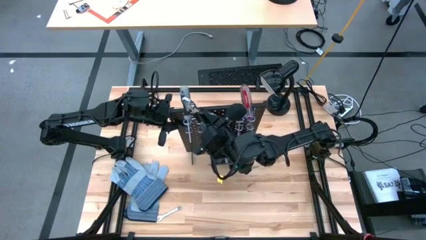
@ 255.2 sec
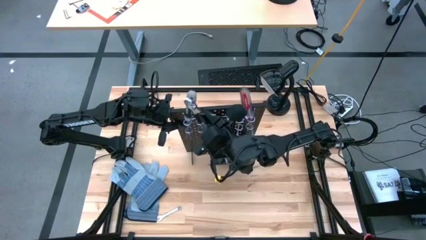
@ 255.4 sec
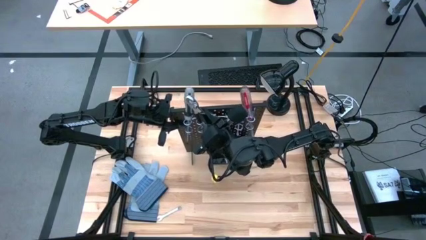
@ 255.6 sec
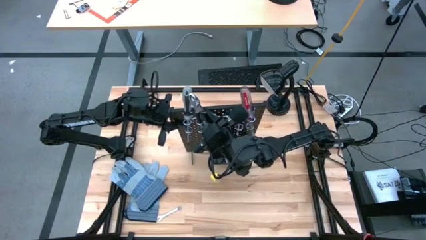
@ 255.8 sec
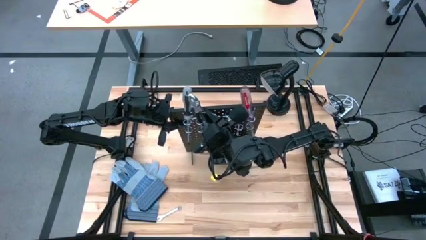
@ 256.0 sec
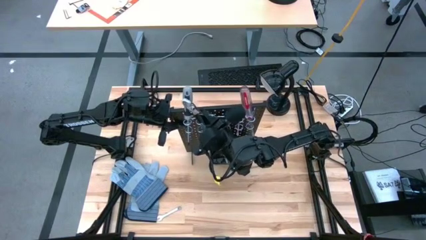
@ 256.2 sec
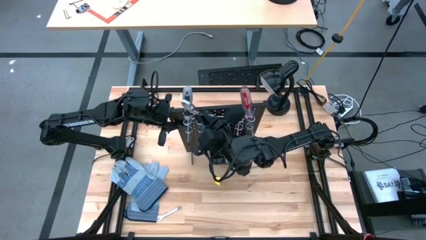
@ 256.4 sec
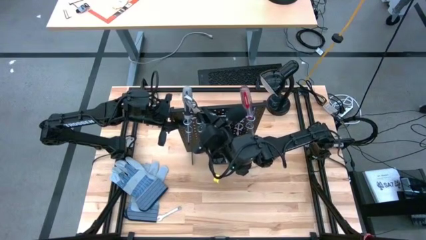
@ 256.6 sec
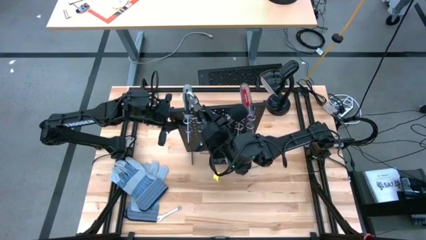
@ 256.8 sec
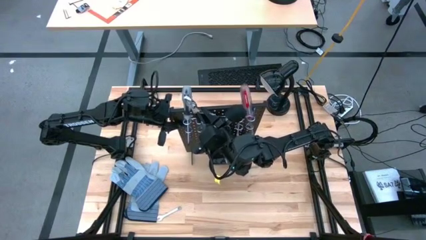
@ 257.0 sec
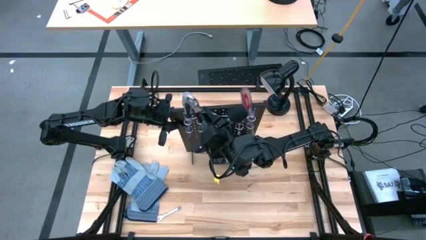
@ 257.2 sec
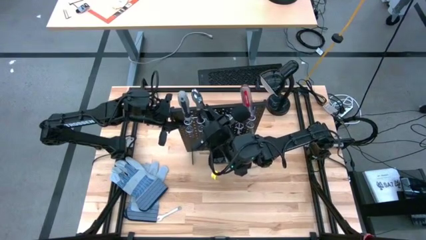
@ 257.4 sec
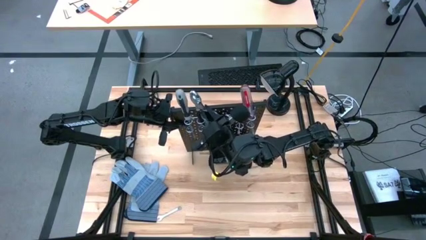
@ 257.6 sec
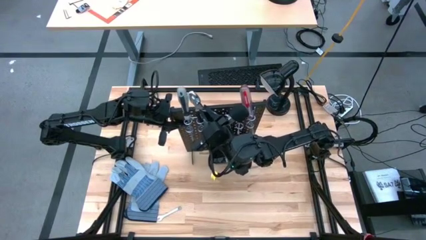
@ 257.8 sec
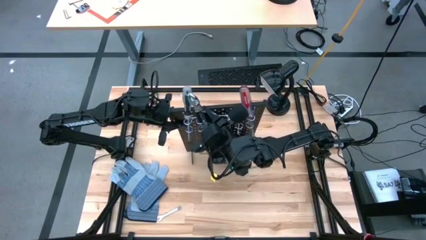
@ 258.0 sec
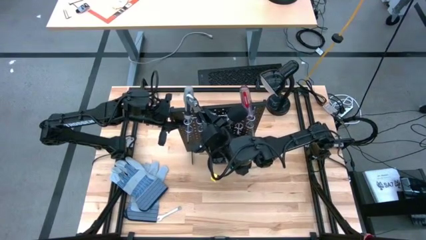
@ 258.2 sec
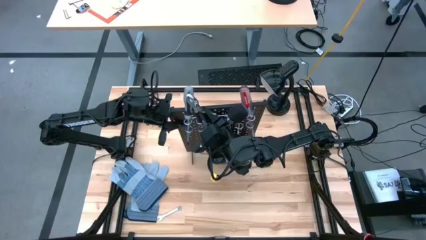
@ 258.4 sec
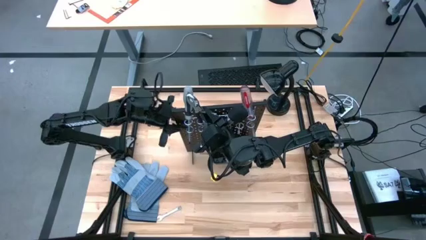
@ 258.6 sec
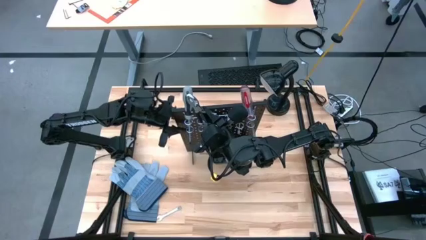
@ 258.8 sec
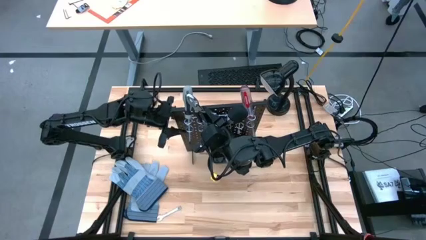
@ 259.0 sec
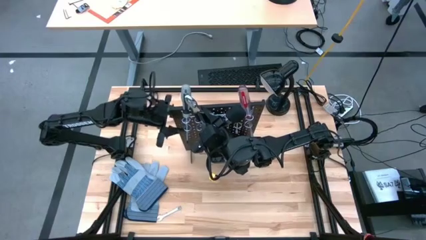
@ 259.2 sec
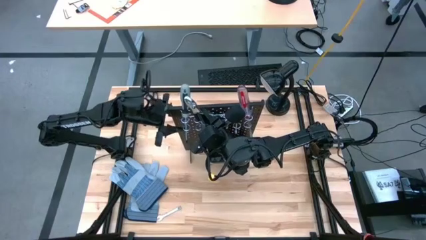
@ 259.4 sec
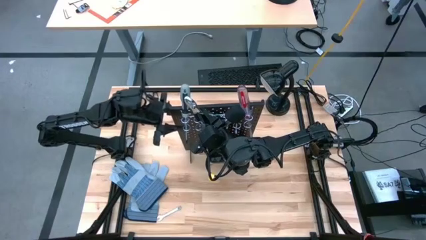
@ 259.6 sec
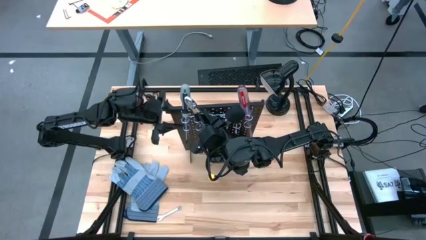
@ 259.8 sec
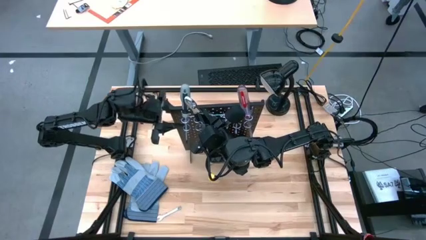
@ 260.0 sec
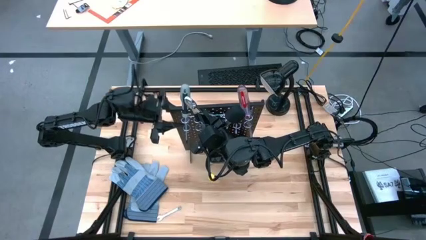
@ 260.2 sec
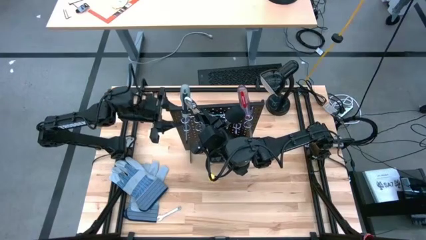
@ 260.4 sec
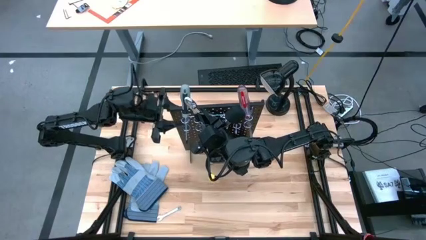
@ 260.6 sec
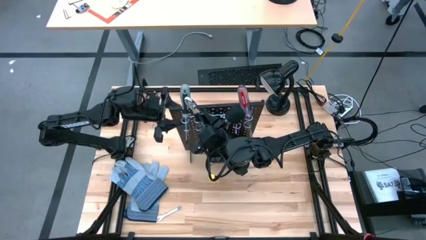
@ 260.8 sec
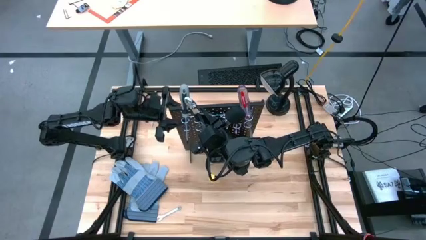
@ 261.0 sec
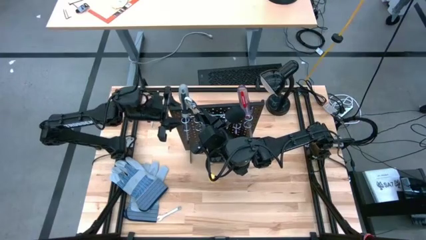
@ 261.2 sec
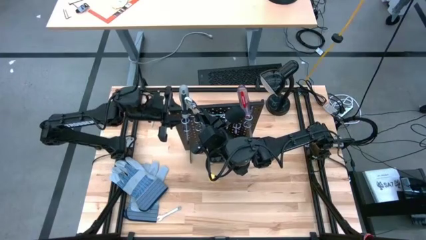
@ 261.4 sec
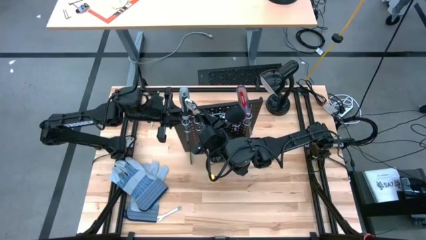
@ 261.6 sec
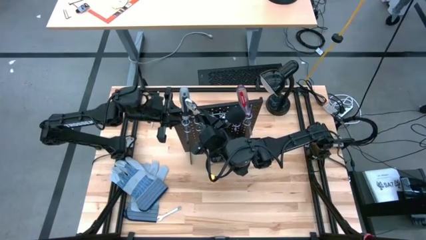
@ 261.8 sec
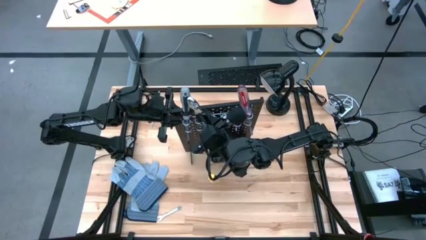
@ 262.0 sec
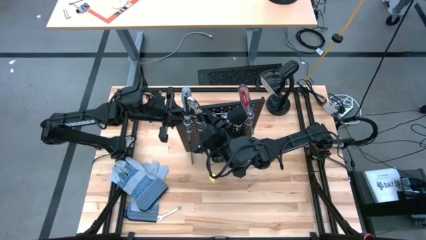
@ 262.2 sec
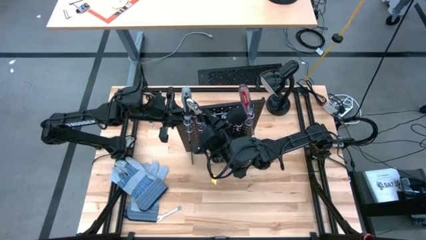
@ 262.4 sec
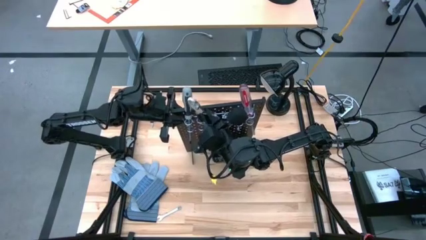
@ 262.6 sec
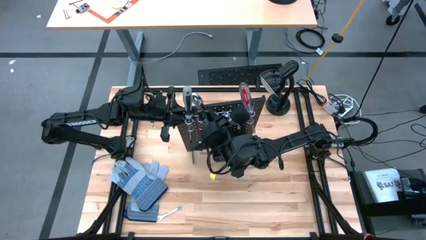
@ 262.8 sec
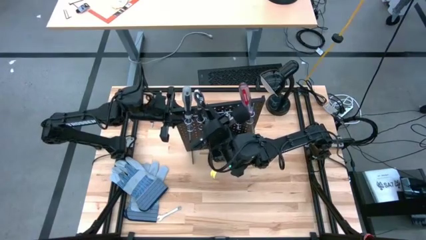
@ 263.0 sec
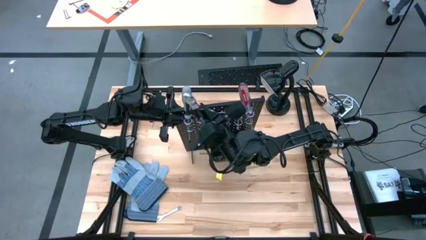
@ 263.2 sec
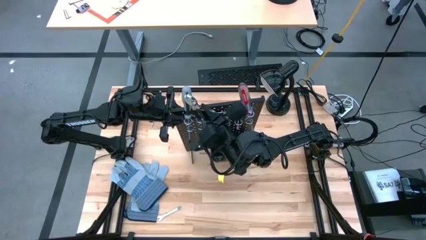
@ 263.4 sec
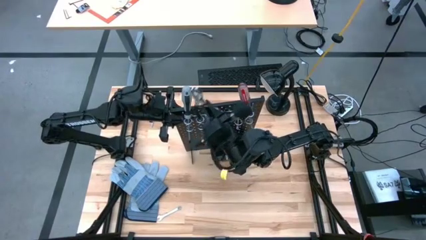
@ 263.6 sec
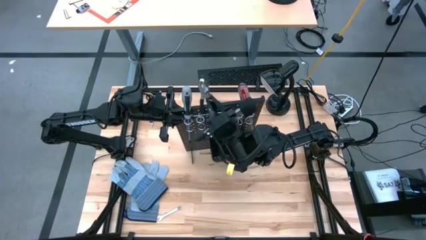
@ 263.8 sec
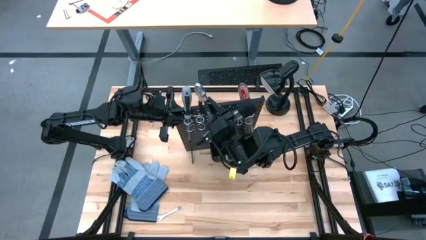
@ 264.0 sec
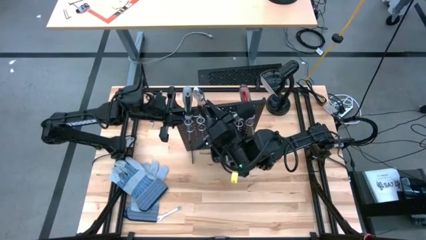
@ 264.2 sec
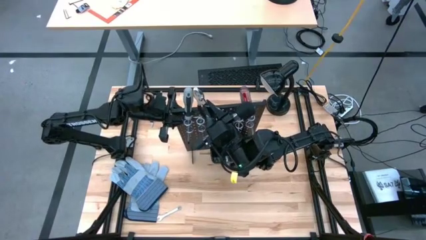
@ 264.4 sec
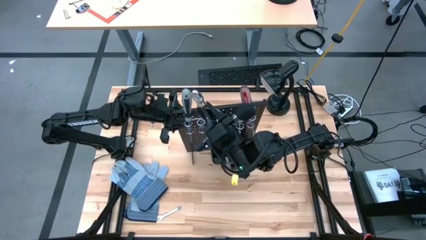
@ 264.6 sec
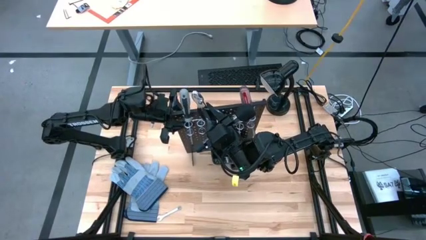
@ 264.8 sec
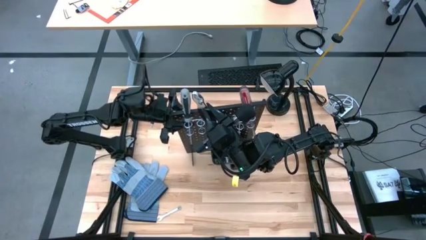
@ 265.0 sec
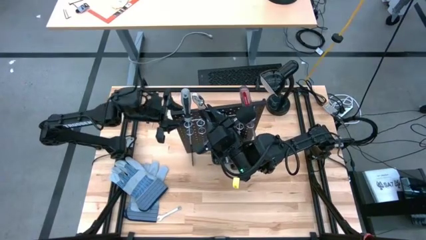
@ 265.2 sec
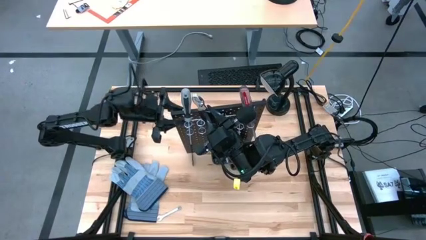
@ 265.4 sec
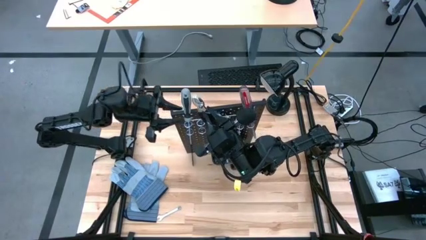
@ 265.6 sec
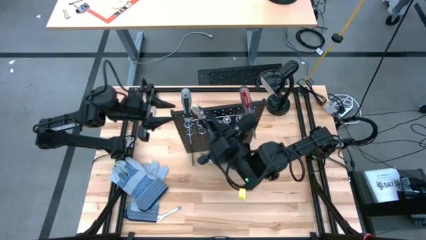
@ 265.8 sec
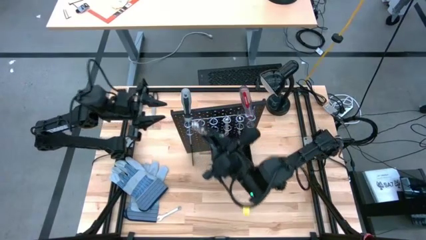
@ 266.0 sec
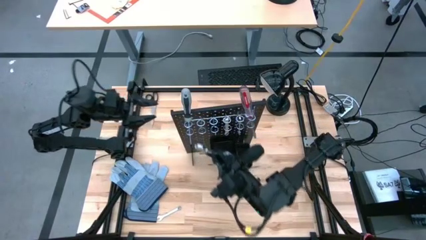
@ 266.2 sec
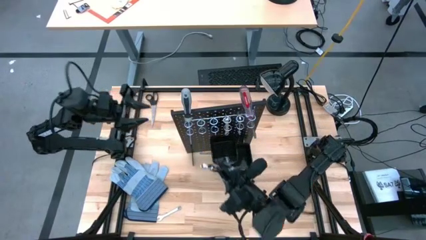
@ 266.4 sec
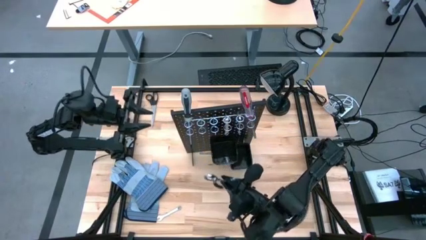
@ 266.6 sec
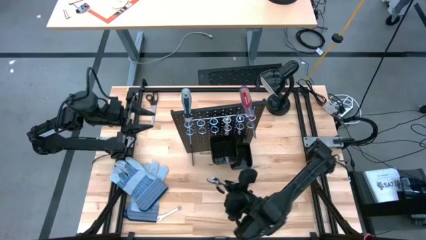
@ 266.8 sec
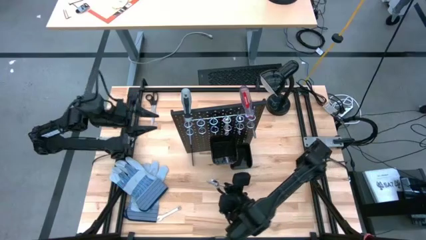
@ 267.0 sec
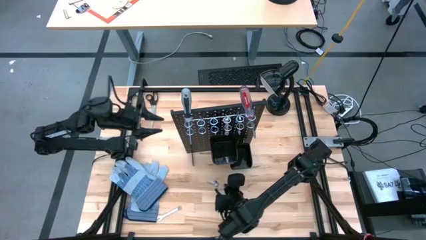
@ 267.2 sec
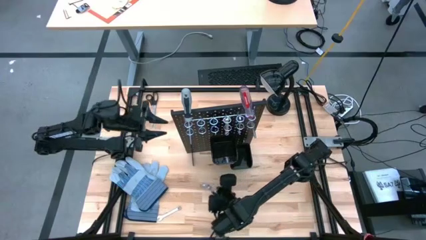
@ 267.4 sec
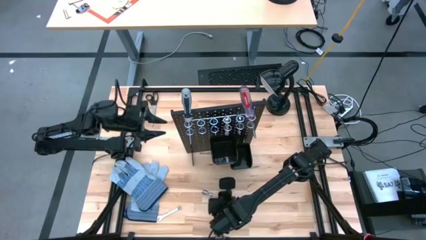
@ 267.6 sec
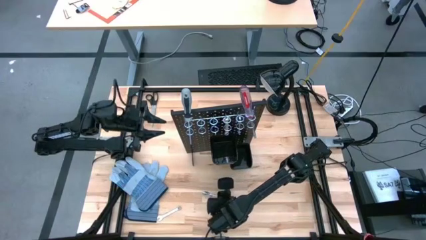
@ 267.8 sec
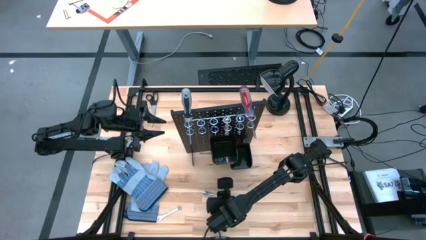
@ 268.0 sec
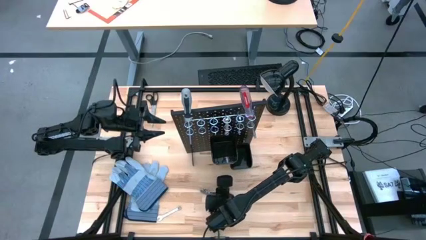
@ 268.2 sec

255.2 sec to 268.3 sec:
Task: Hang tools onto peg board
Unhang the black pliers from the black peg board
